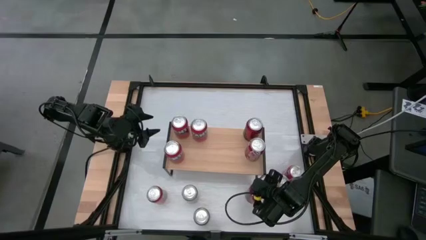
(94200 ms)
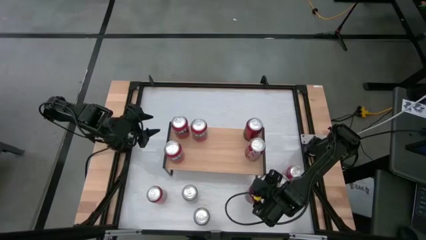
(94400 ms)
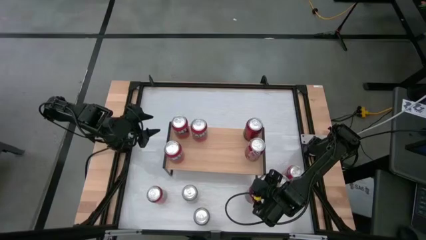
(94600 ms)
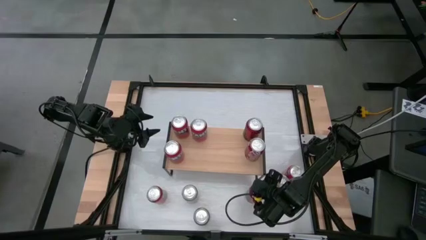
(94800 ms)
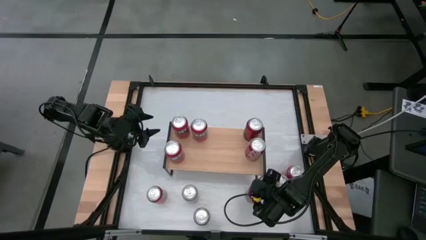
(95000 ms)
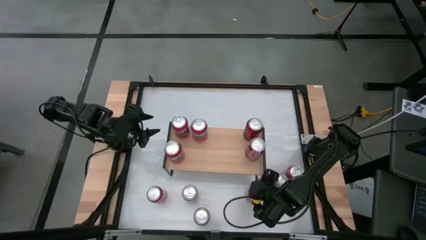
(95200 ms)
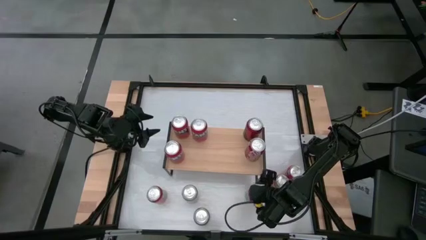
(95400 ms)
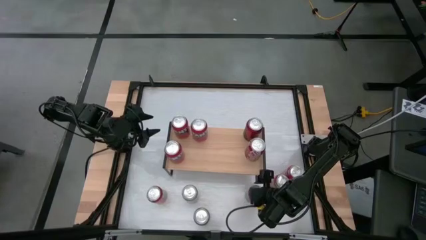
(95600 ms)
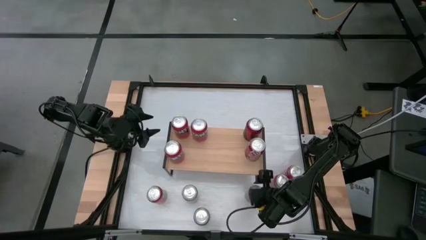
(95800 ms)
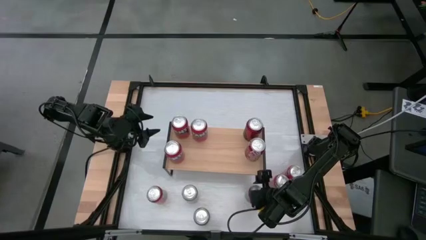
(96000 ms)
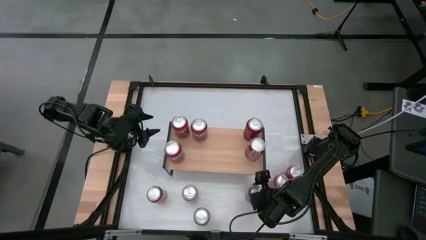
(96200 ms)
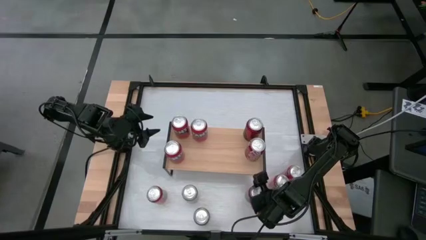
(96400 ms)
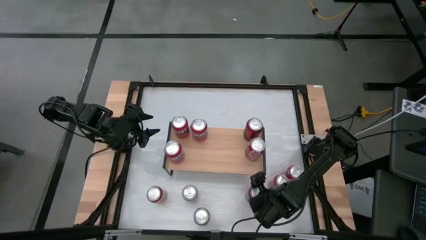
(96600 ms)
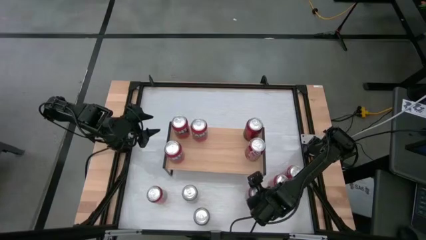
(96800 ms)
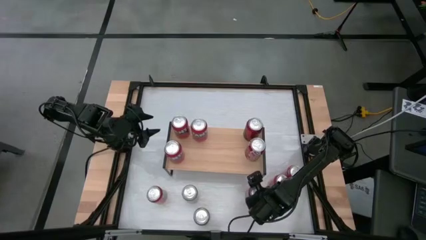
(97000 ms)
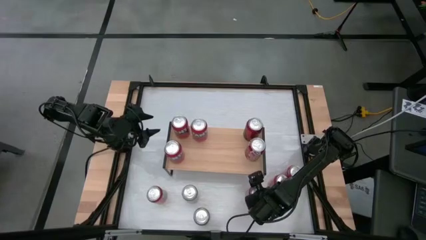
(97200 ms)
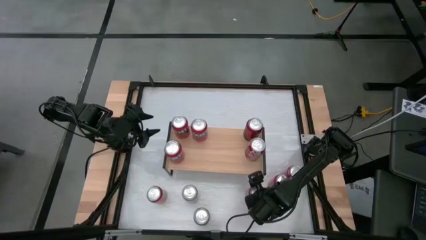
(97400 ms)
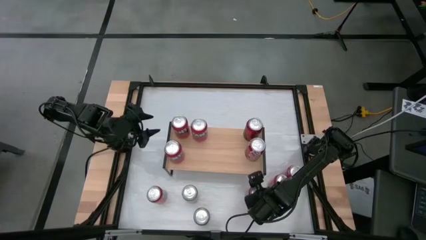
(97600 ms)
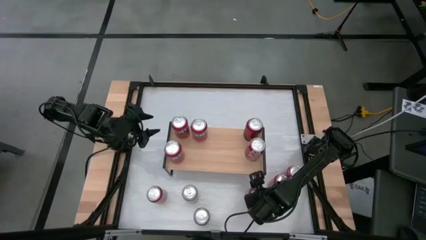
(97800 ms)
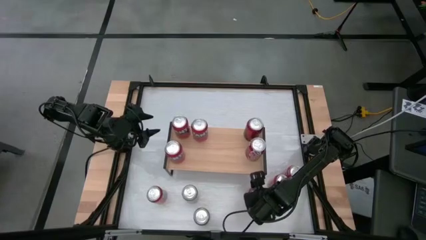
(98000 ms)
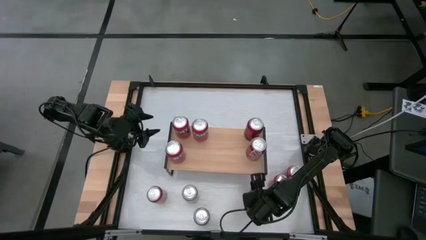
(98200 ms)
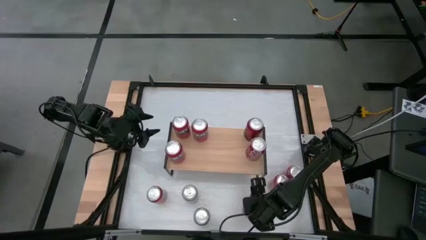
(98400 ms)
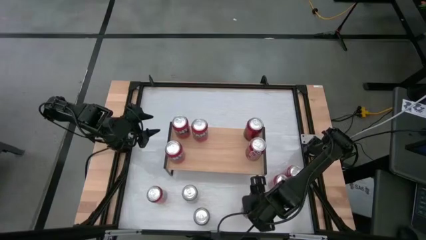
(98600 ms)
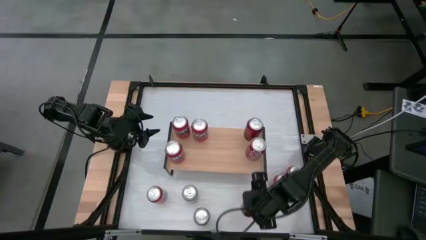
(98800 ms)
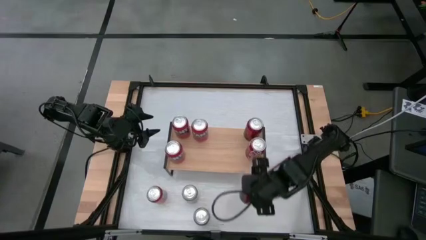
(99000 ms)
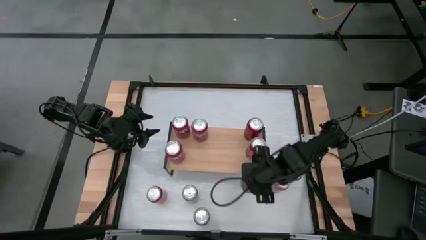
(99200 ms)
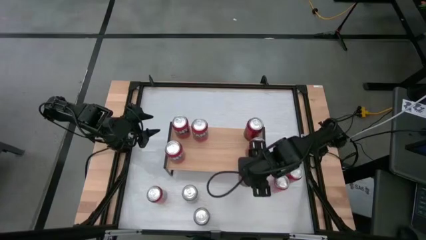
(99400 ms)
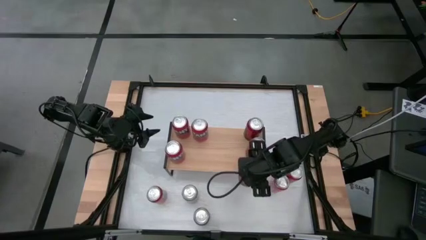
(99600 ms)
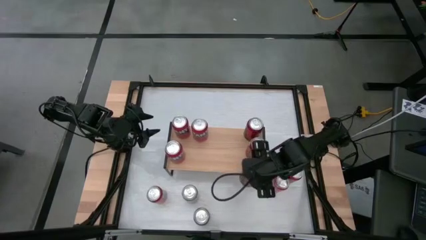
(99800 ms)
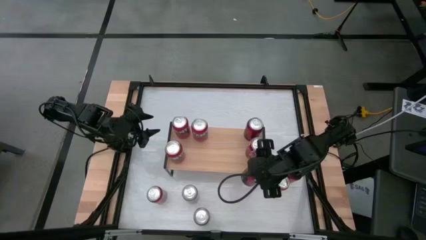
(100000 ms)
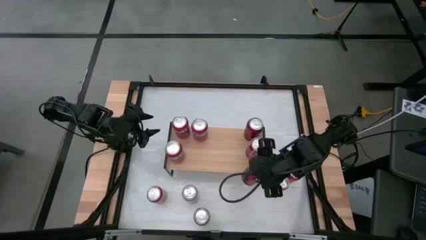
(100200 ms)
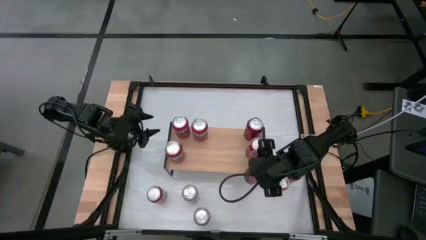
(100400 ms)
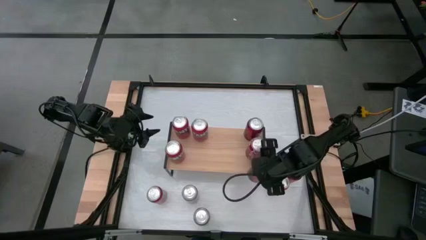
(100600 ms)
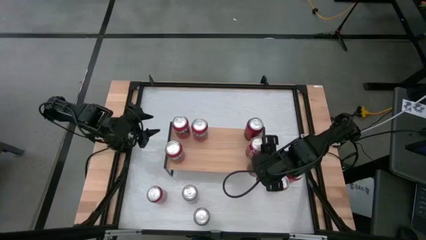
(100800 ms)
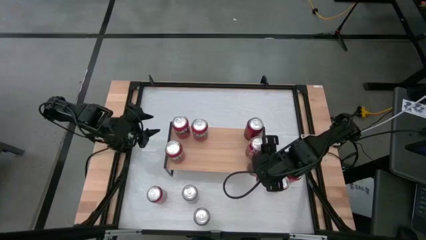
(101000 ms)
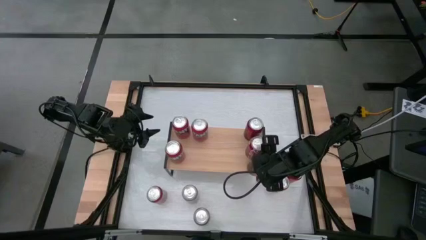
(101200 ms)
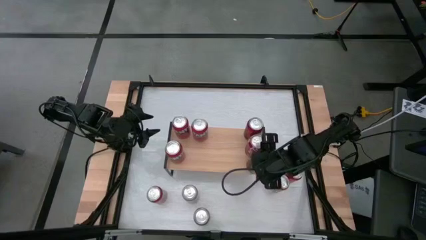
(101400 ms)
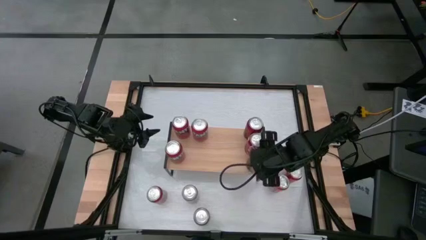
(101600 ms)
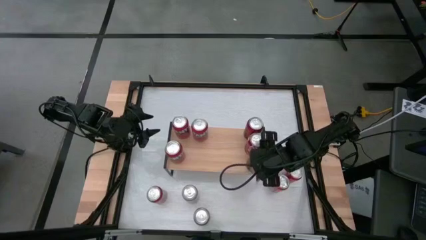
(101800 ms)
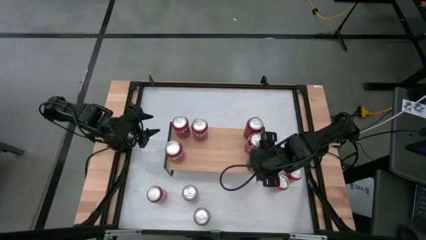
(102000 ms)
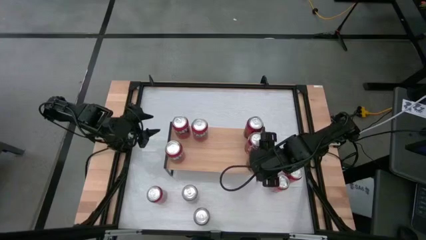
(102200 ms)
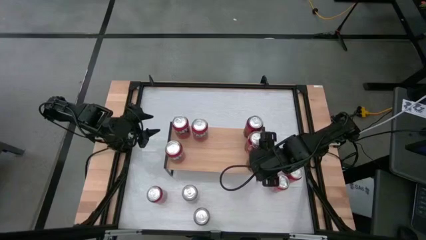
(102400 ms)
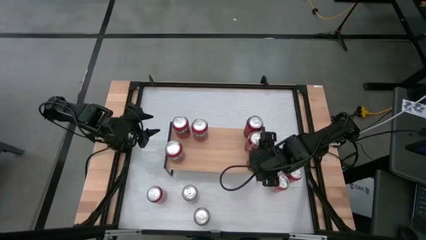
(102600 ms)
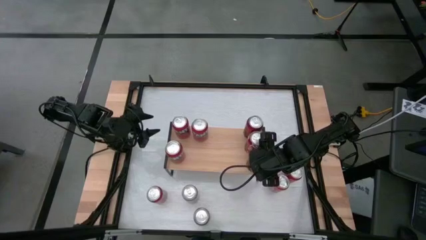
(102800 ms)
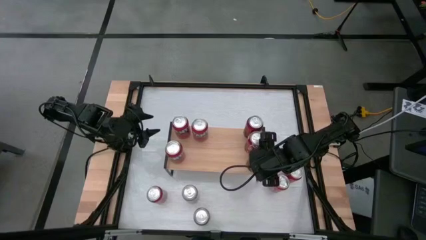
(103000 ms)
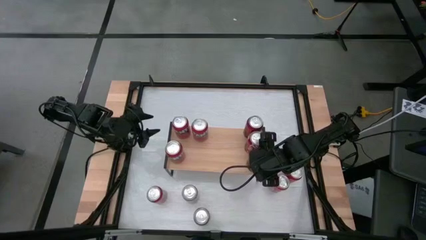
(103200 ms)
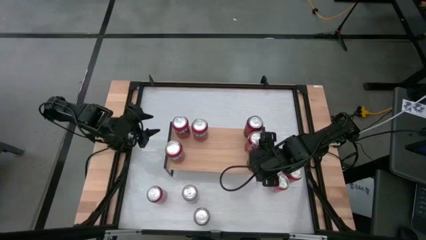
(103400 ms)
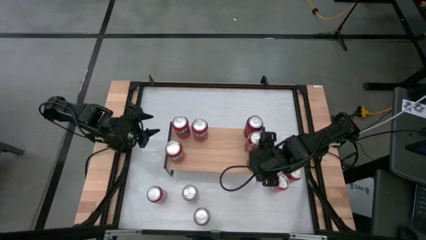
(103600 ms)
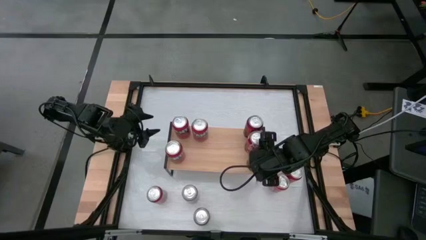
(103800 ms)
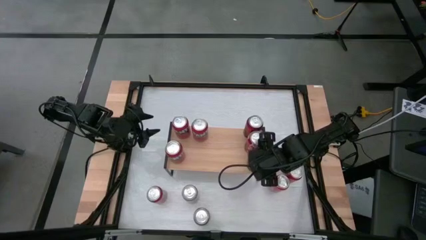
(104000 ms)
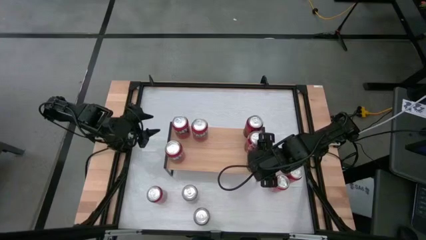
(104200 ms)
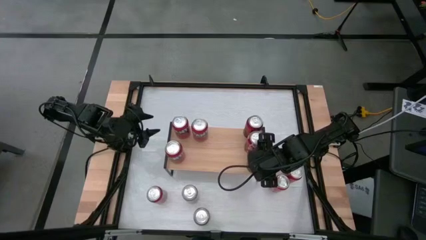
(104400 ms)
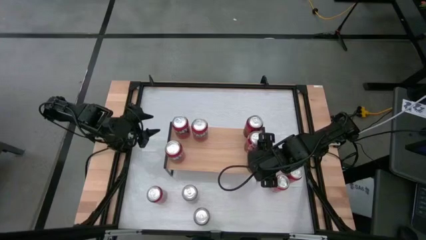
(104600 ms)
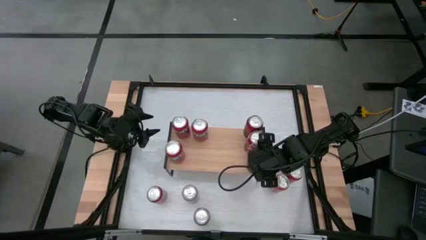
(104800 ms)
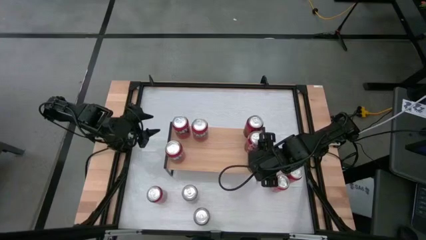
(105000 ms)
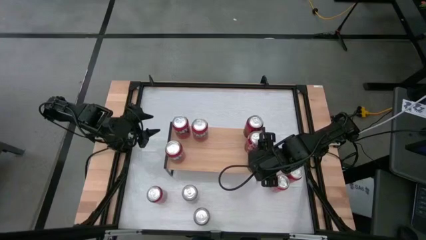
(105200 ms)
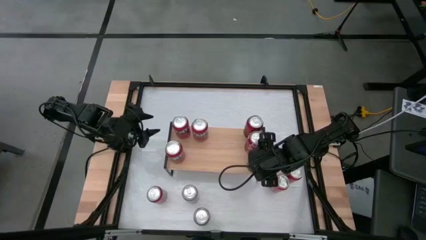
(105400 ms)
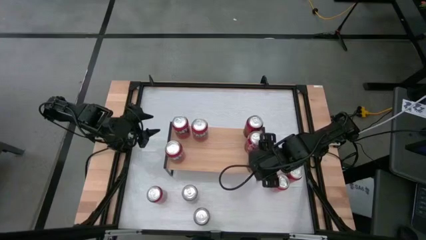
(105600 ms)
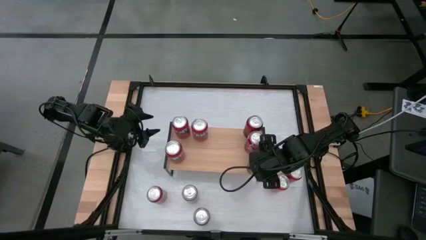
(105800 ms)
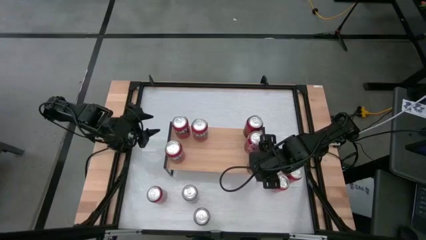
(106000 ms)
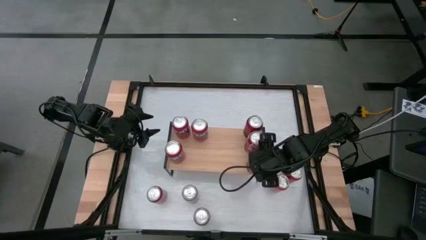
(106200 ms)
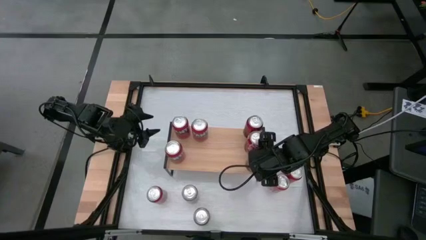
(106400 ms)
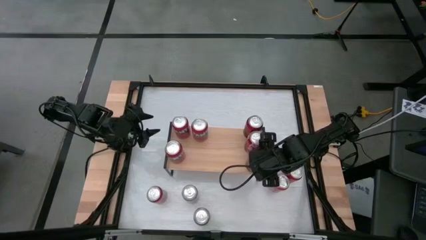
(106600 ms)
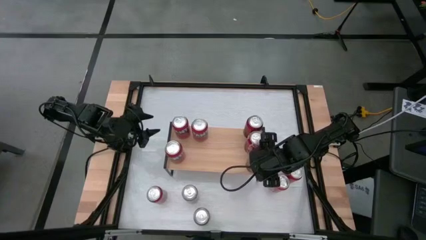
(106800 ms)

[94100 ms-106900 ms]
Task: Place canned beverage on shelf
Put the red black soda can on the shelf

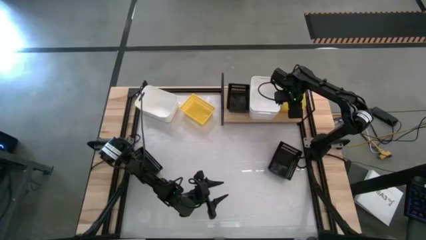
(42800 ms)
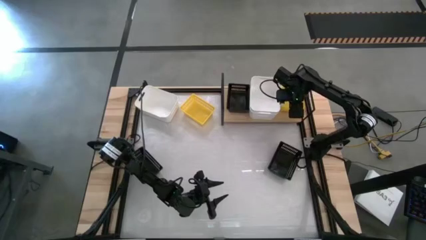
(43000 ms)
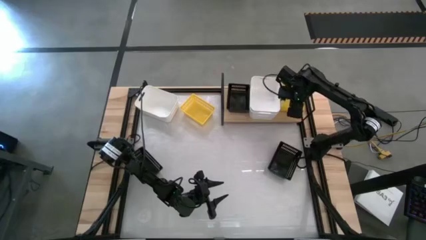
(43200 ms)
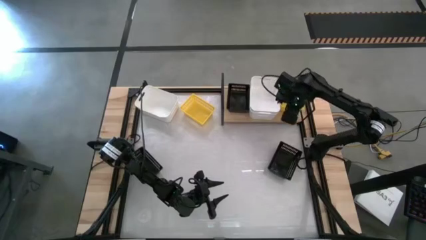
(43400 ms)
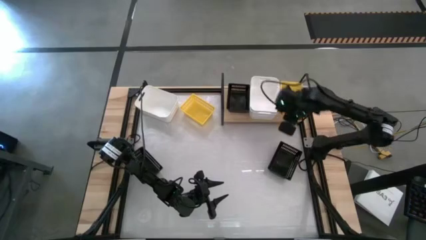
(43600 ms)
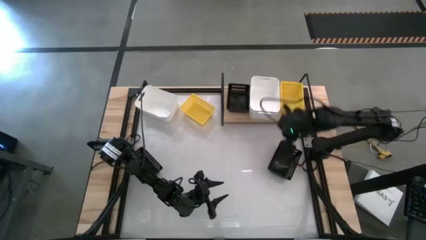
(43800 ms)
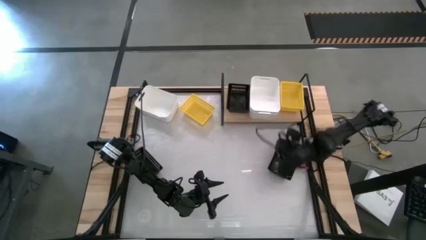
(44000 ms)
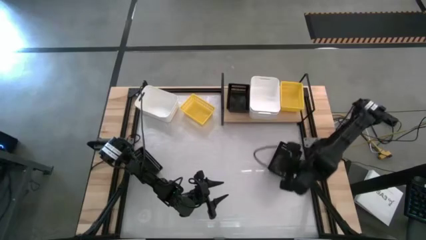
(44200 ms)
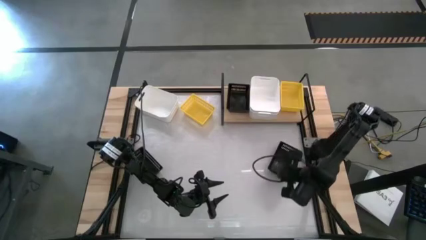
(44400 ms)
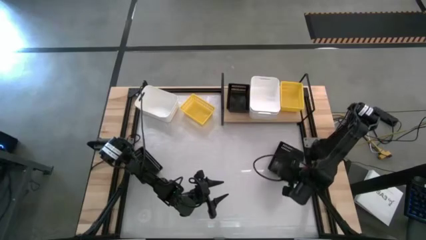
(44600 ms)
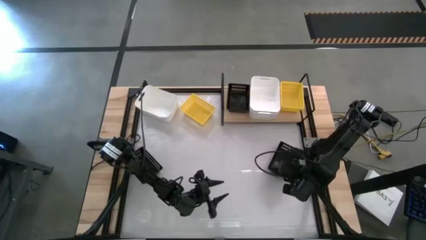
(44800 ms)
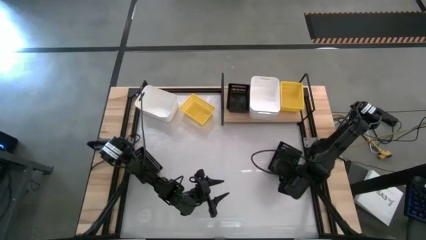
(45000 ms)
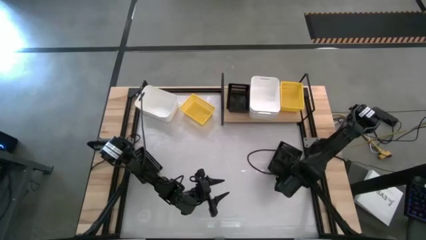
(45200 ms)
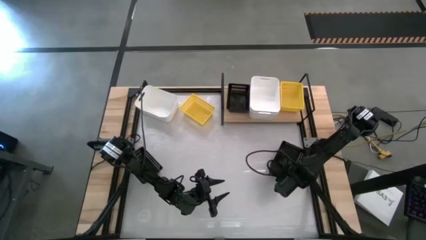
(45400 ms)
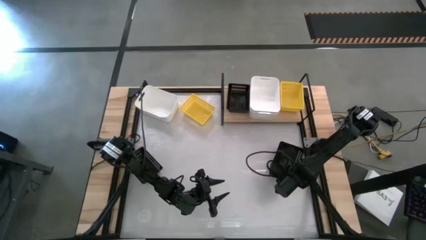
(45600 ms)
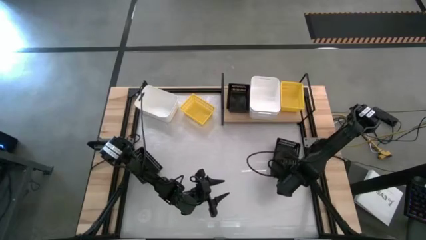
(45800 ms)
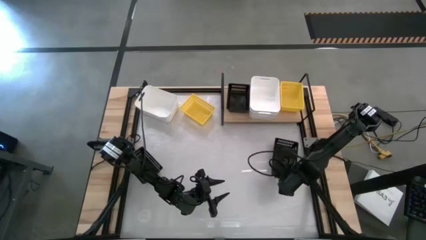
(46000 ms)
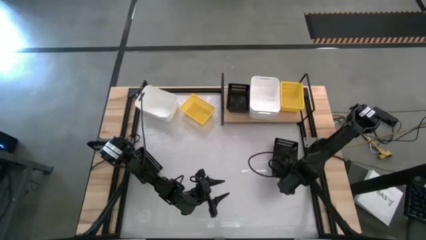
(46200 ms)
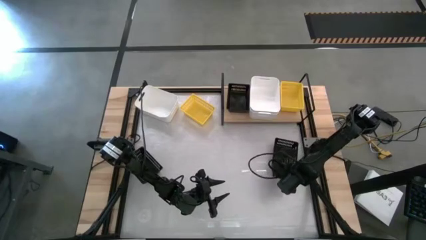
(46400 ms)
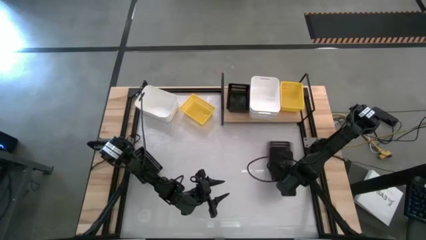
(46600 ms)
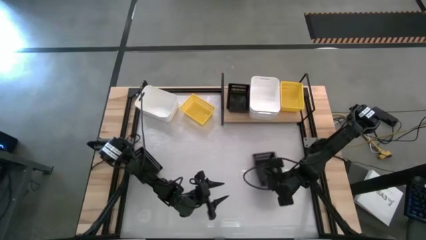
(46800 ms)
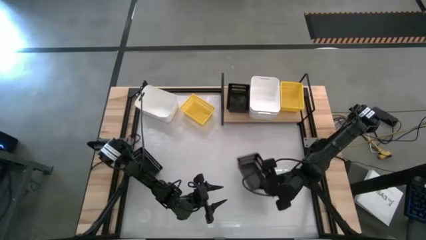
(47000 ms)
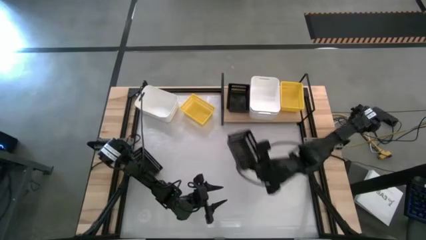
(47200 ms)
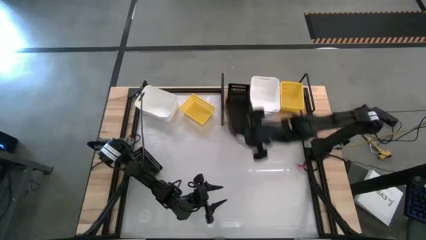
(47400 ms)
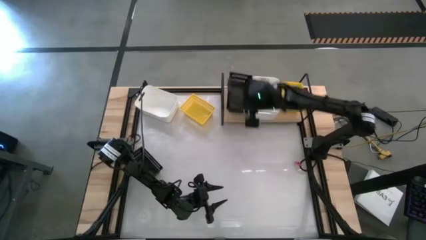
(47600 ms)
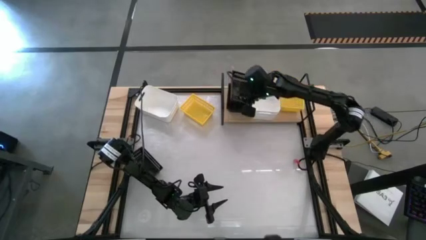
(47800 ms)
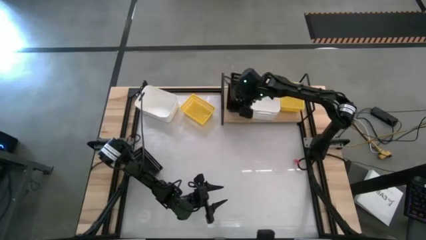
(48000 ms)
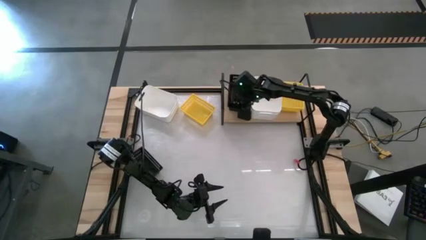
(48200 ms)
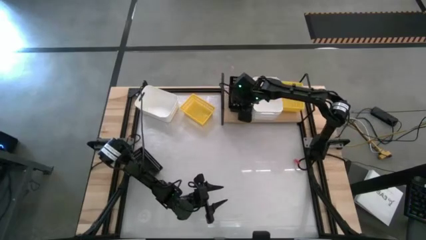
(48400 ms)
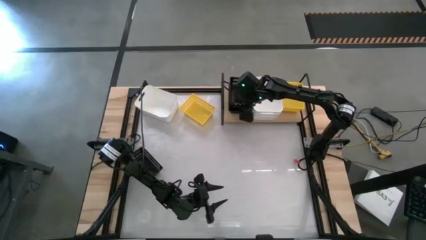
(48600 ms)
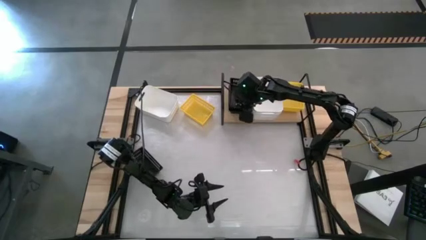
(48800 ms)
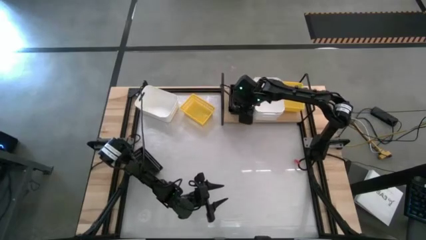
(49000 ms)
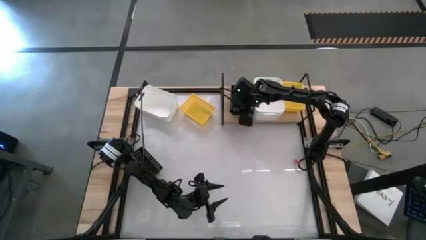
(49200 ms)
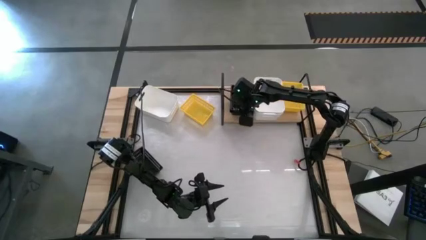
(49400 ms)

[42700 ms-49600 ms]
Task: Stack baskets on shelf by color
Stack the right black bin into the black bin on the shelf
